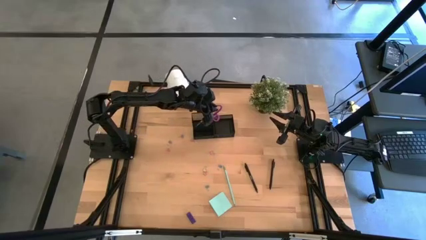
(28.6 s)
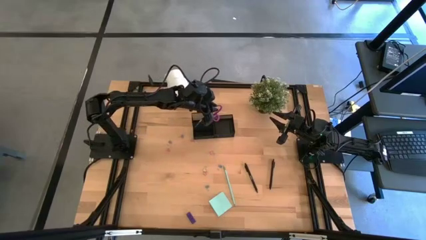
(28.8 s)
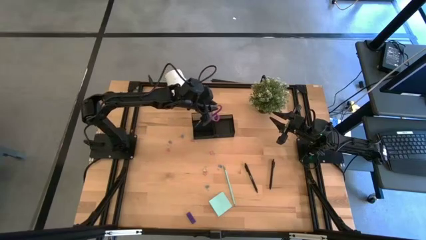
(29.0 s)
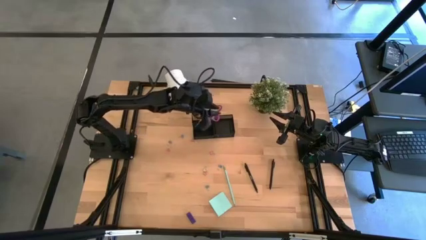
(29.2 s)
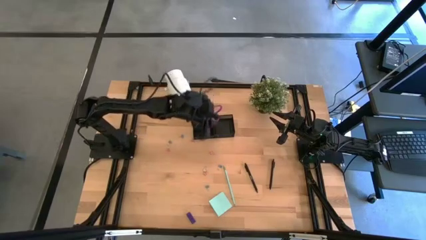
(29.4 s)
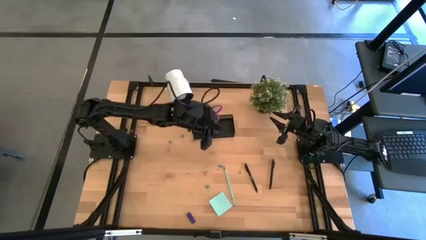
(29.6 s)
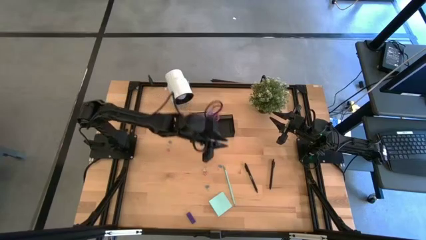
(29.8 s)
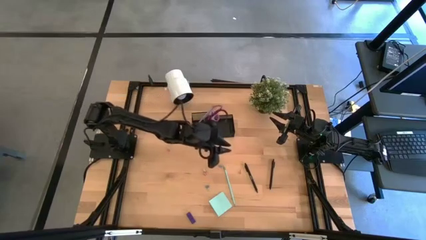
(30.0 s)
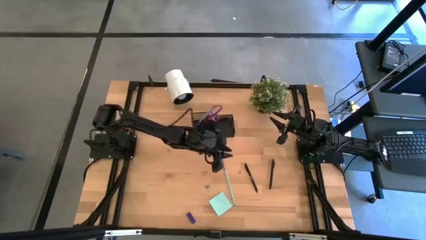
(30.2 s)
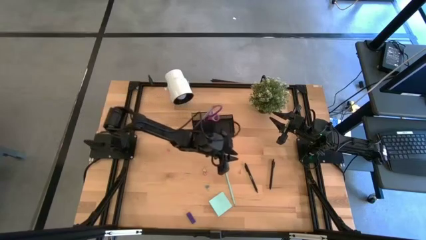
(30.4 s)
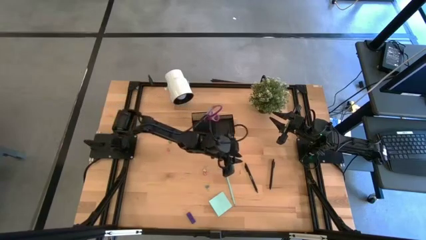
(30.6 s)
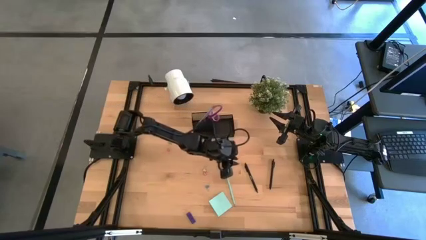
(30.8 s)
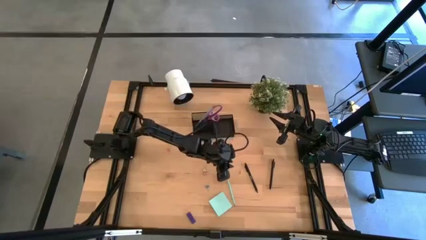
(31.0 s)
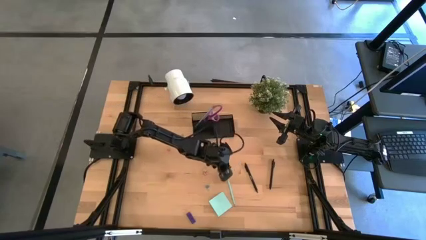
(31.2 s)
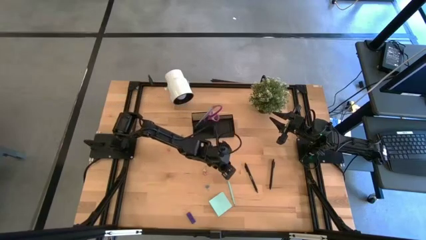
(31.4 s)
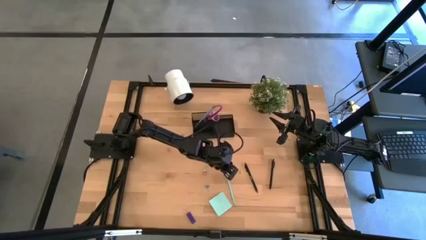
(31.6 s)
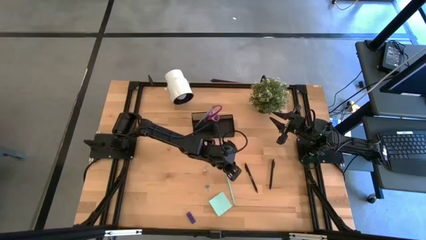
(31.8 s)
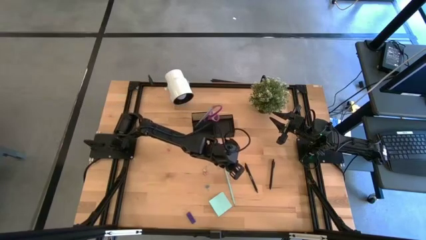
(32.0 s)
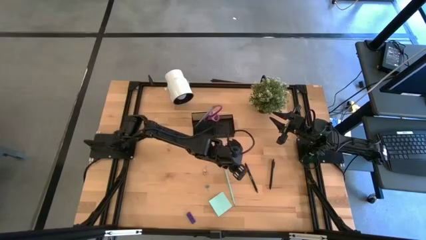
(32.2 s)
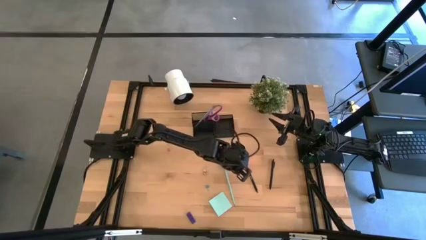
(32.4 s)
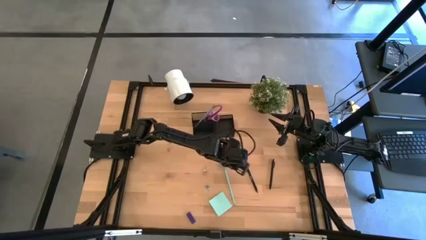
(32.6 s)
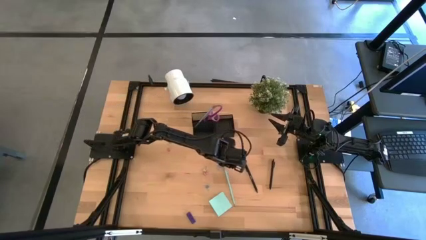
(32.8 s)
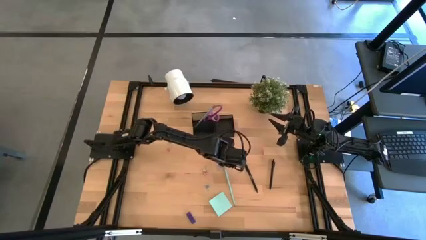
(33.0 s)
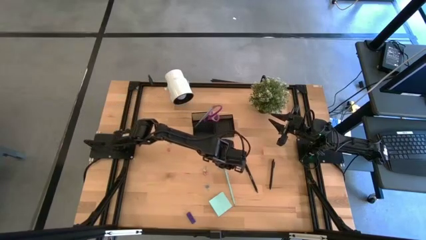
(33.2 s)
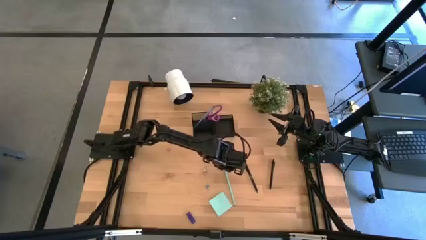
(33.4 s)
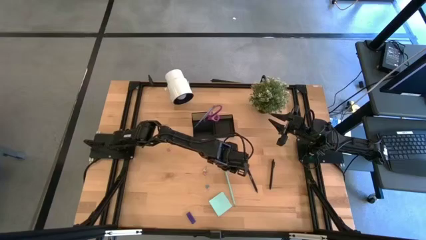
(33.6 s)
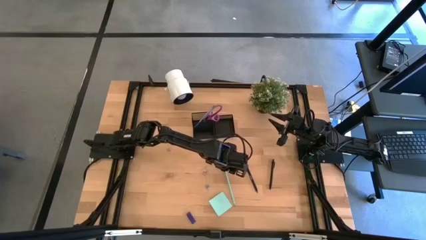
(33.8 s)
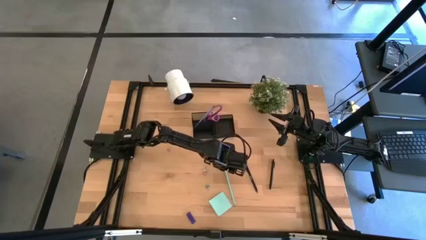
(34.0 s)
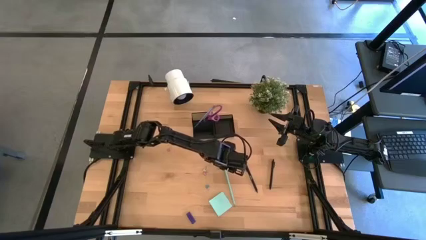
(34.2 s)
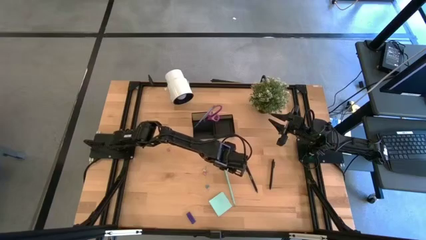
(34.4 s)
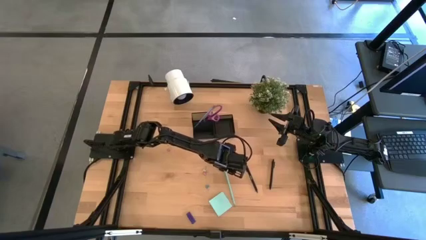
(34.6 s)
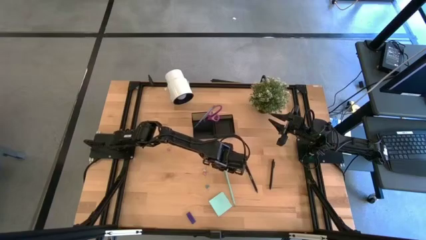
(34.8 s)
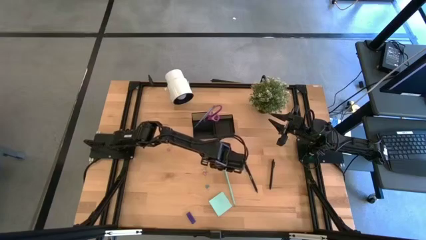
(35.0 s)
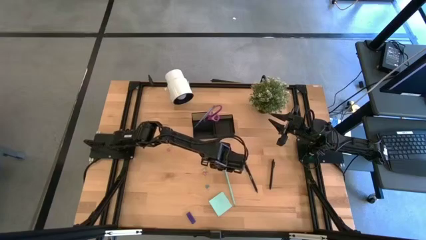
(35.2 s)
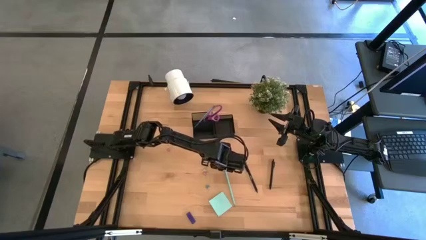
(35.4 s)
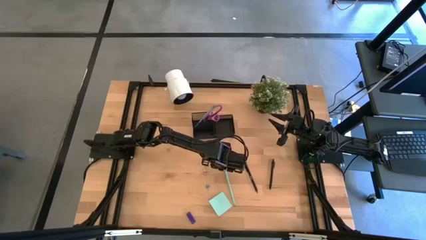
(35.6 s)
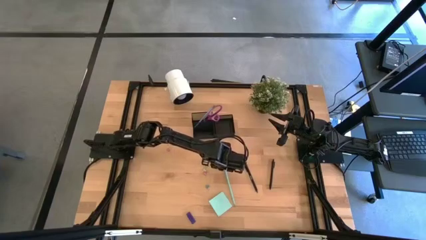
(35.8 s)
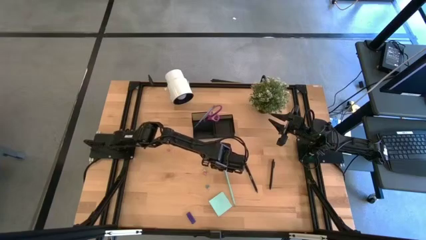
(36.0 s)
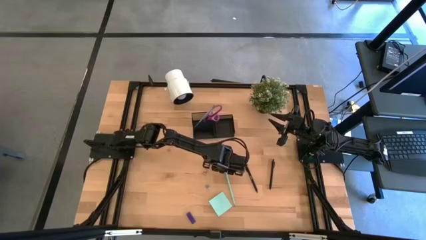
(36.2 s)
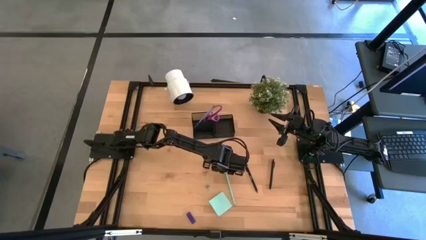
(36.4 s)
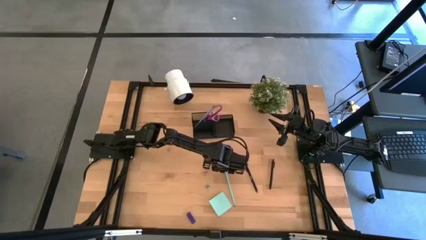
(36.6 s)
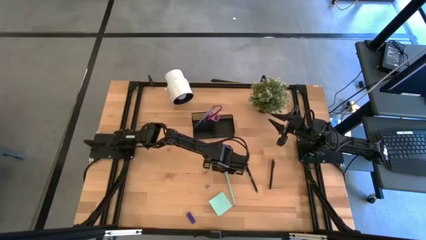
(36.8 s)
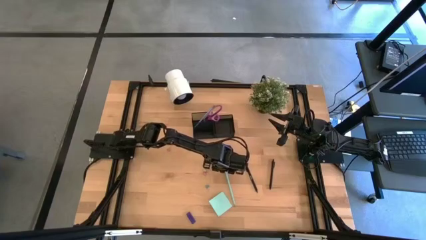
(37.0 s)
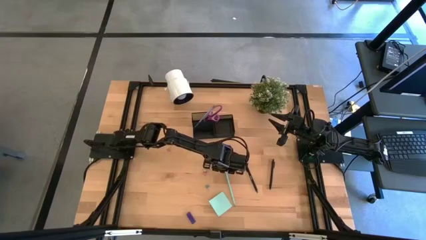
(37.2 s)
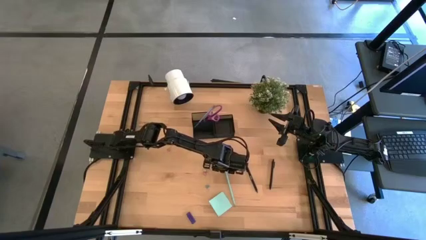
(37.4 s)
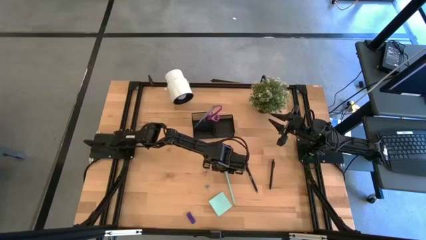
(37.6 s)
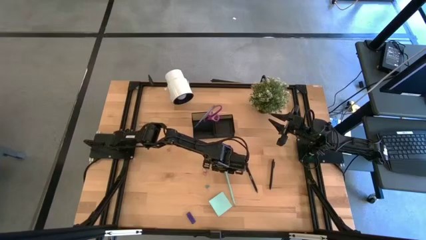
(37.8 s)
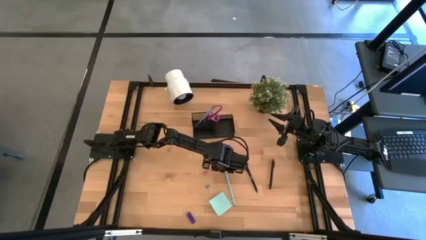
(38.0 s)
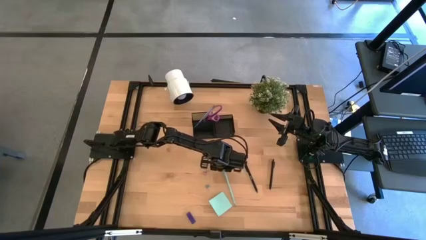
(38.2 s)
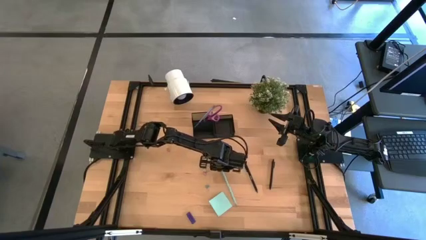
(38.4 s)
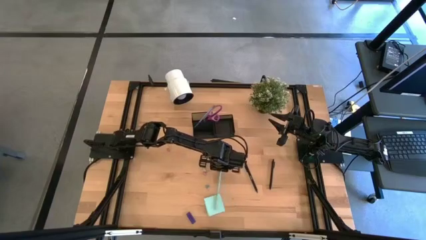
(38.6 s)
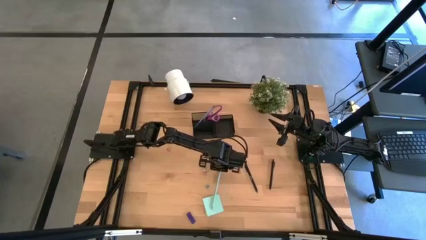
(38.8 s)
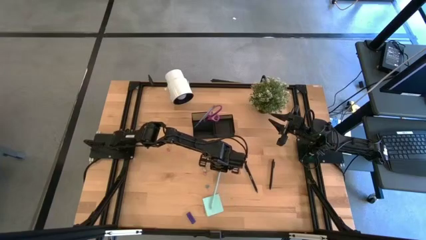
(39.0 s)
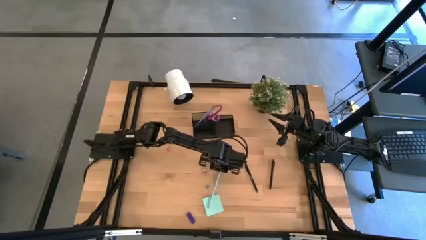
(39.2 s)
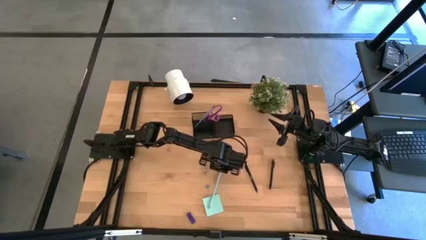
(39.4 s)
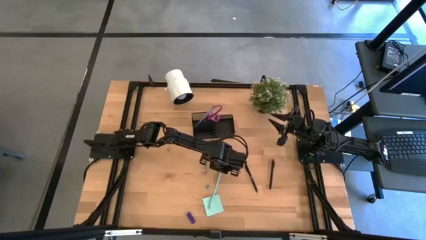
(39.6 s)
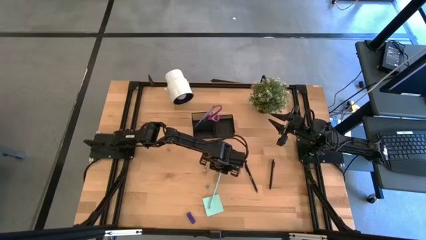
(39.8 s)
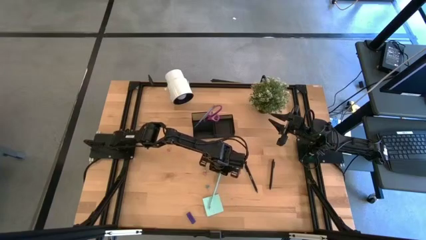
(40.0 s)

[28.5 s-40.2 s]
Task: Pick and place office supplies into organizer
Put the light blue pencil into the black desk organizer

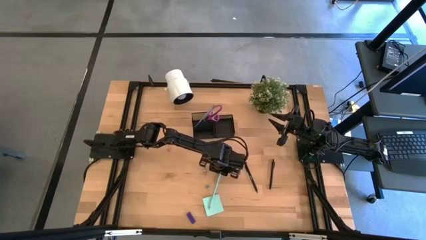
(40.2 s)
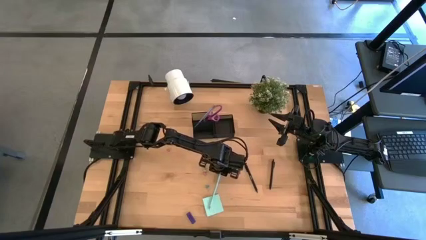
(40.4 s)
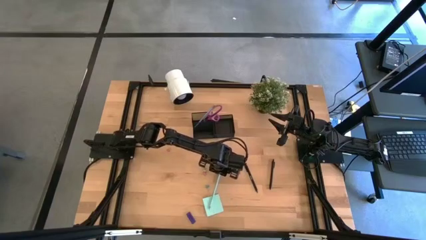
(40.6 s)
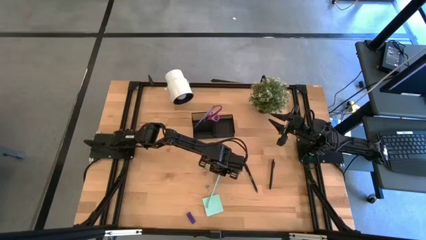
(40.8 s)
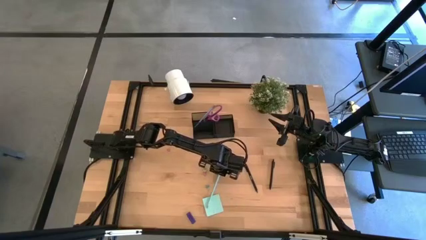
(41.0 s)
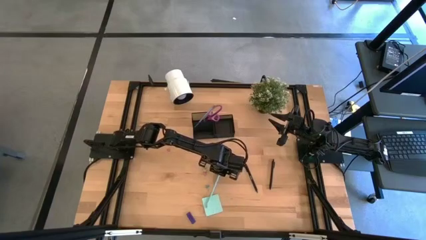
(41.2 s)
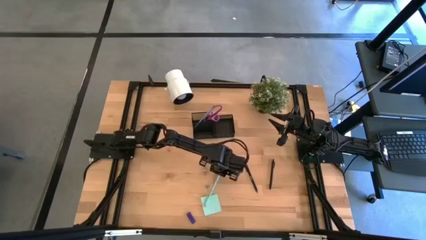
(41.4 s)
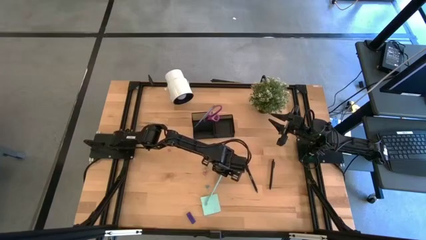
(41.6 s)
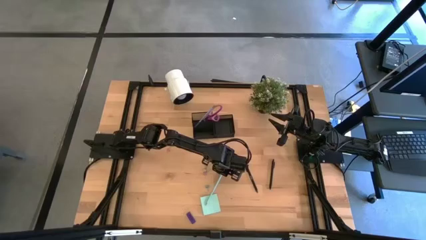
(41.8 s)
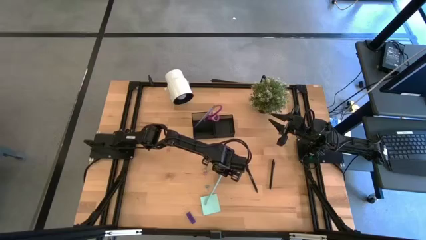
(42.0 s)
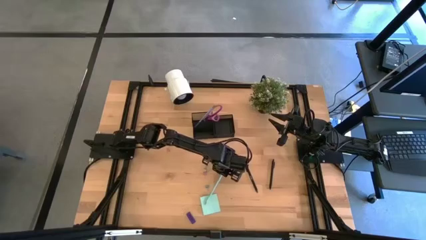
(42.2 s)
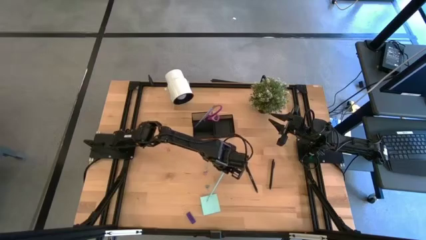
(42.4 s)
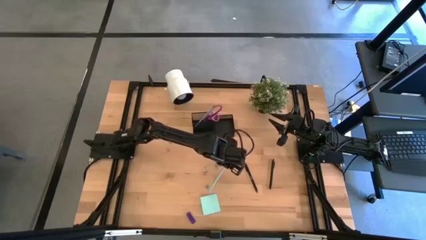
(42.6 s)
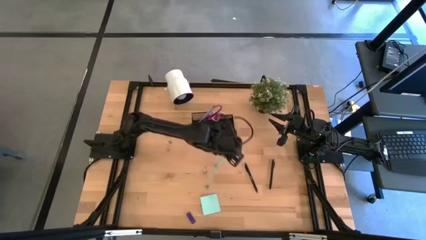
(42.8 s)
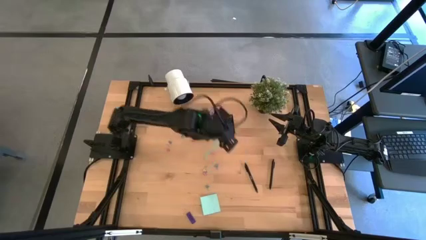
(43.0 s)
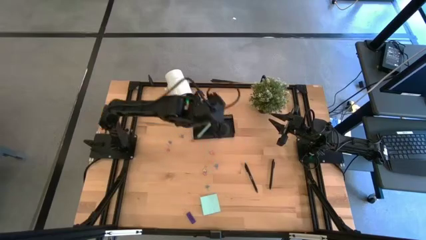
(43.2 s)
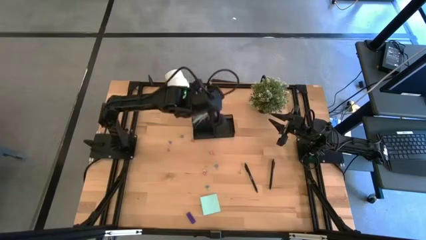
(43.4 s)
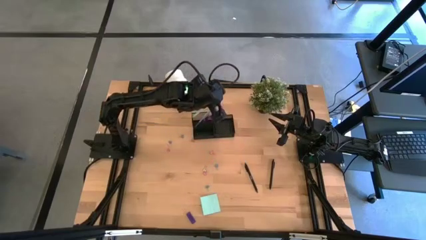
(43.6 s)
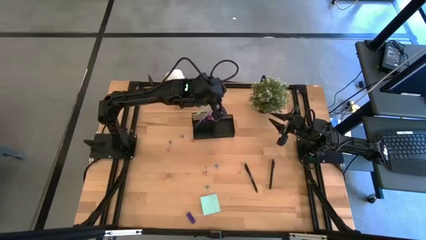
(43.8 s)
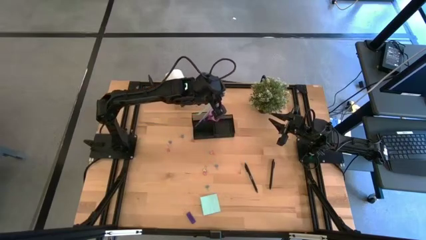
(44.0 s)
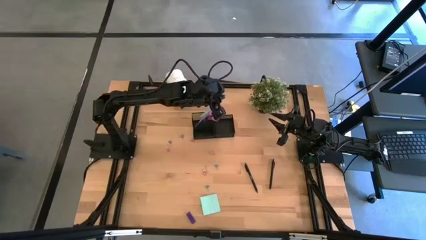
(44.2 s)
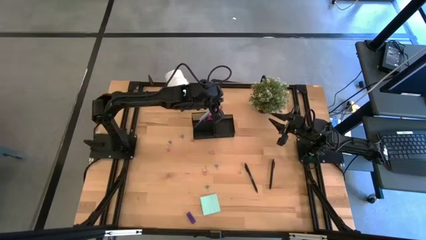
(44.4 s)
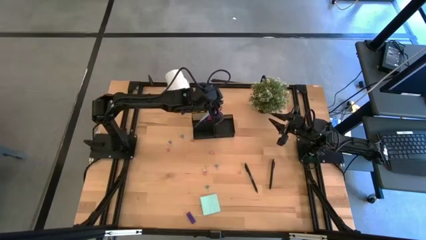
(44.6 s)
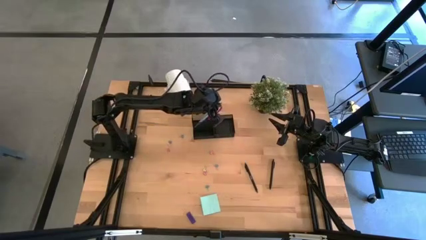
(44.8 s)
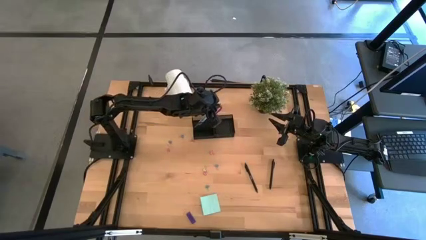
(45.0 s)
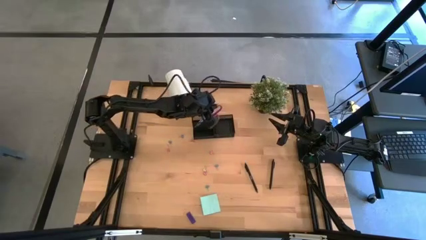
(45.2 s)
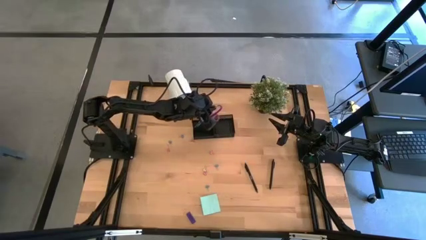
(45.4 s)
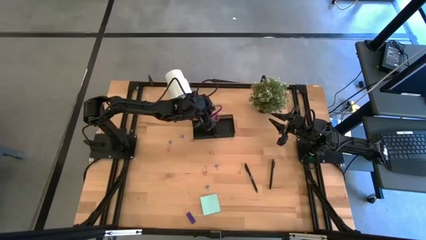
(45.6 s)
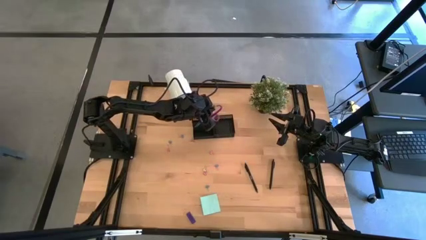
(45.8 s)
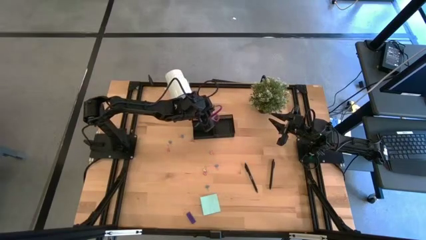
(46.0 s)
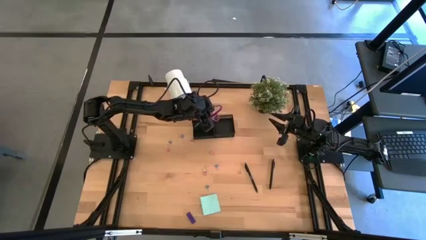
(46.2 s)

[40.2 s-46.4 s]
Put the light blue pencil into the black desk organizer
